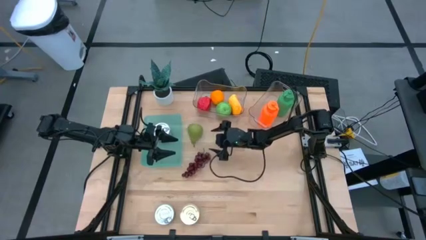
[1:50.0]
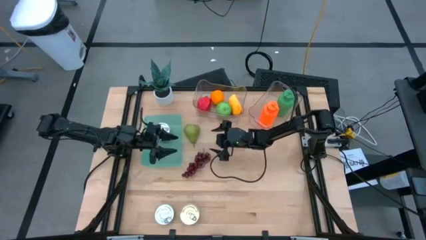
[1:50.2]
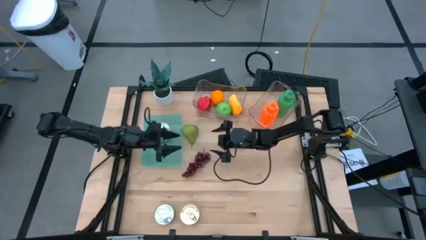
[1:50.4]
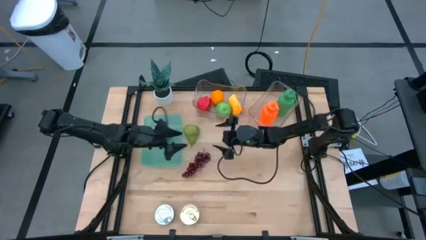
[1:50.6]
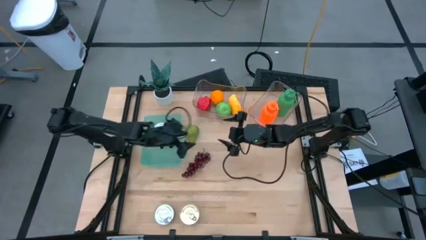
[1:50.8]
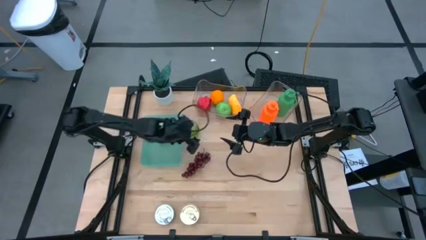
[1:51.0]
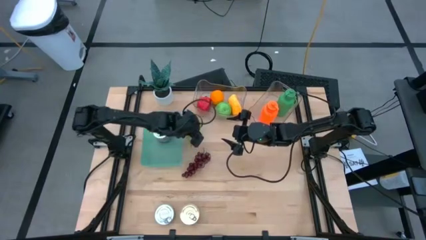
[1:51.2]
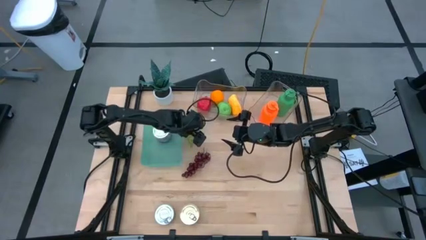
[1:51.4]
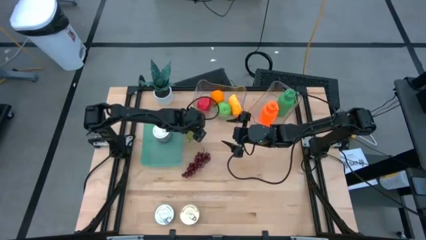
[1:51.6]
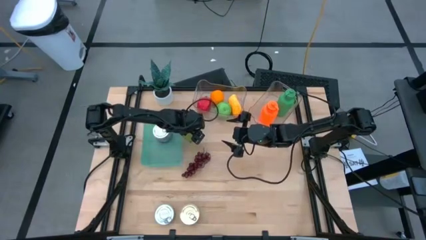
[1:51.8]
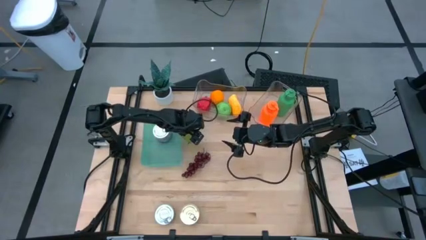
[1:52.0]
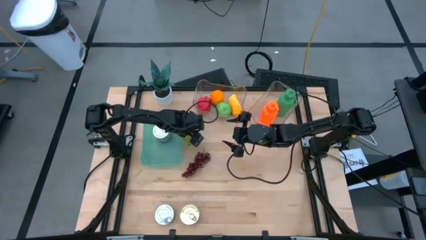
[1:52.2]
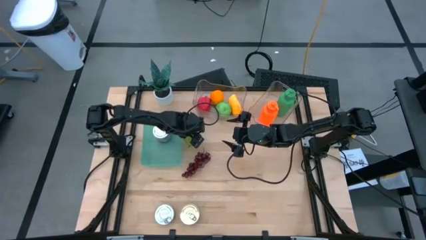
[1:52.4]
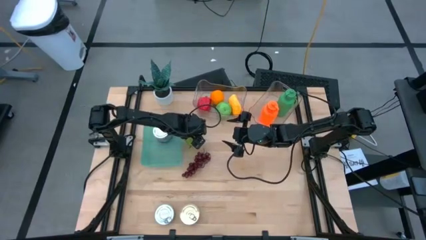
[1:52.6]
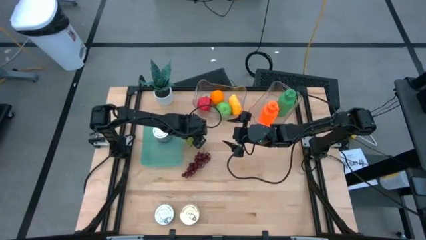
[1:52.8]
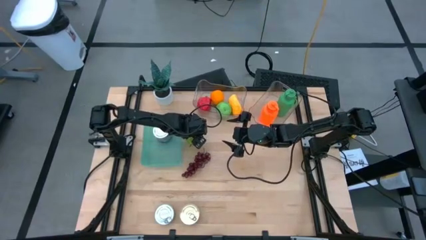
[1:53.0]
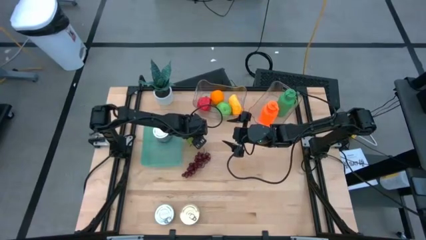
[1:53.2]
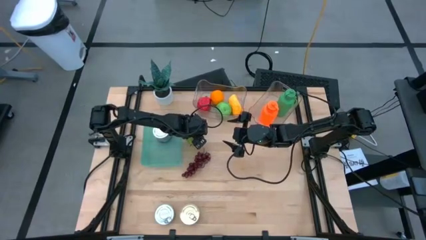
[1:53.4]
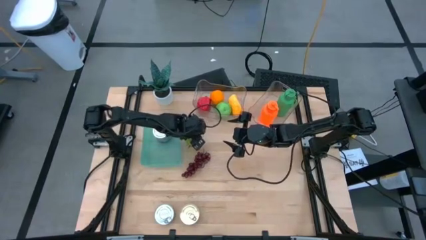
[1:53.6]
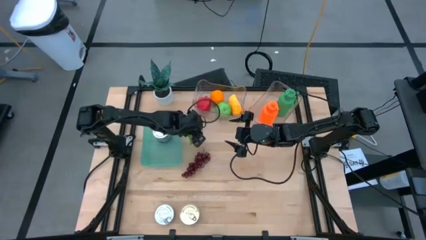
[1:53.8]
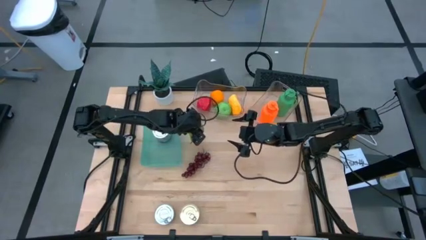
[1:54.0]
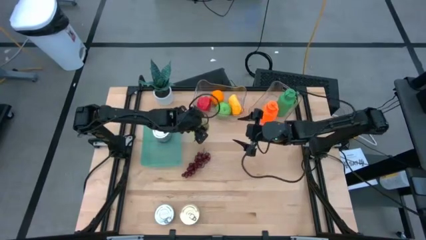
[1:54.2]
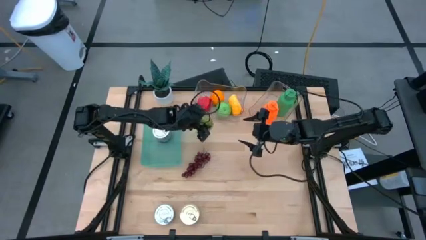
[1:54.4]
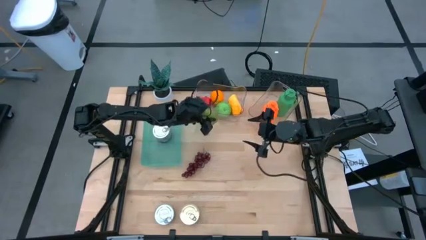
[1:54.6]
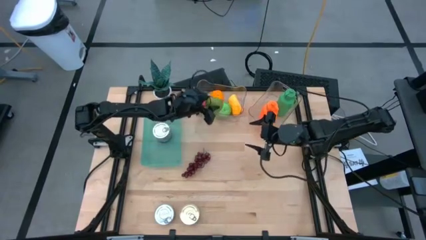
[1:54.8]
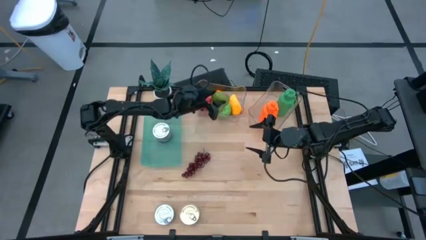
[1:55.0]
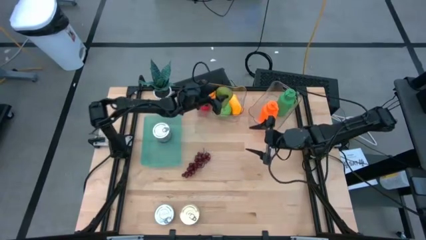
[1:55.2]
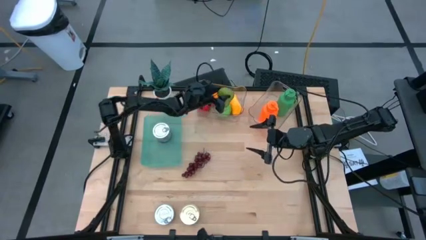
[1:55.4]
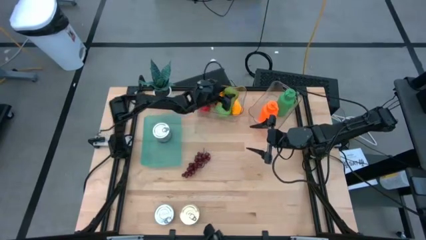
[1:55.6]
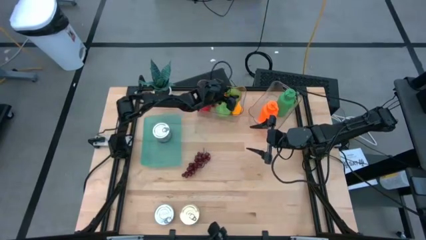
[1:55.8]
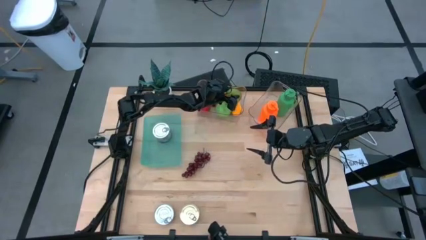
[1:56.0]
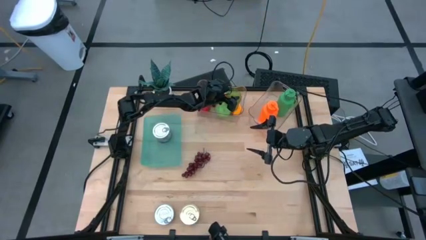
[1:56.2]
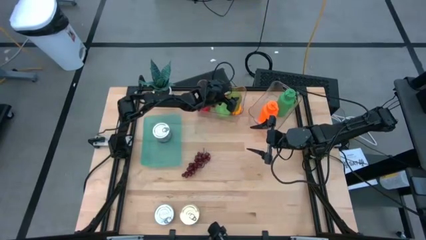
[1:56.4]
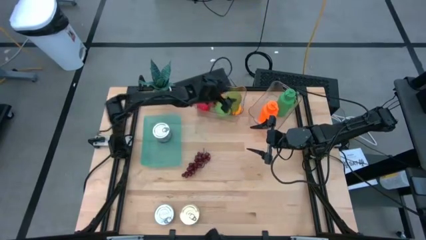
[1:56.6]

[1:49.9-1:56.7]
Task: Pick & Place Food Item
Put the green pear into the left transparent bin

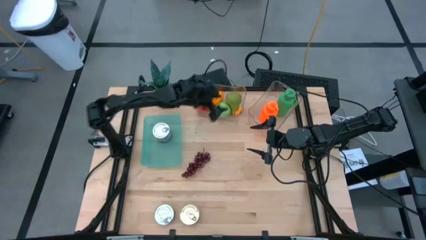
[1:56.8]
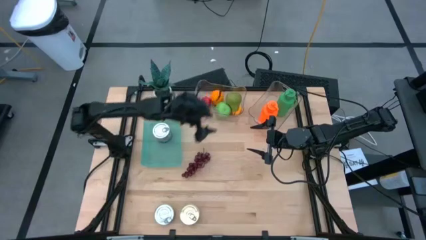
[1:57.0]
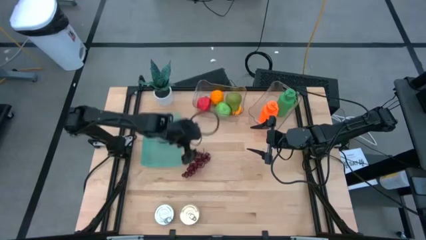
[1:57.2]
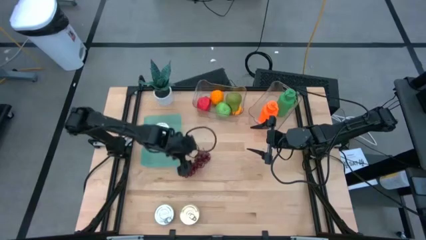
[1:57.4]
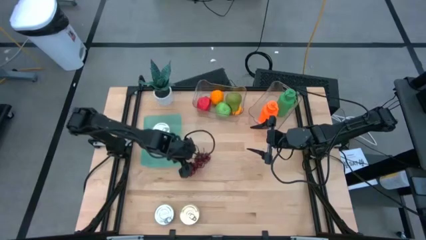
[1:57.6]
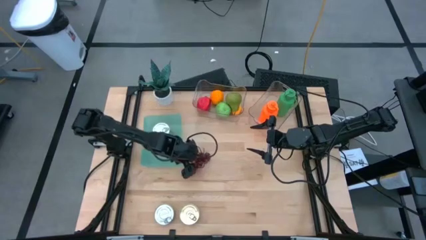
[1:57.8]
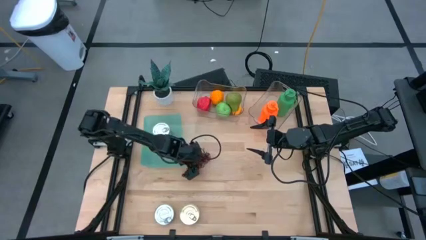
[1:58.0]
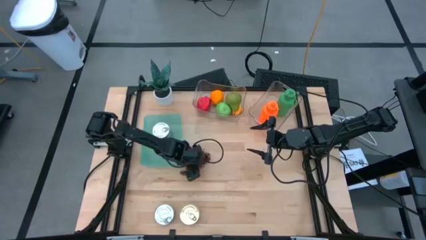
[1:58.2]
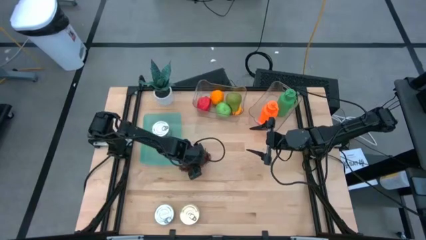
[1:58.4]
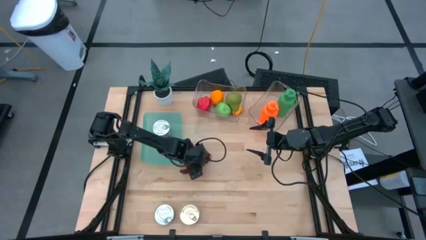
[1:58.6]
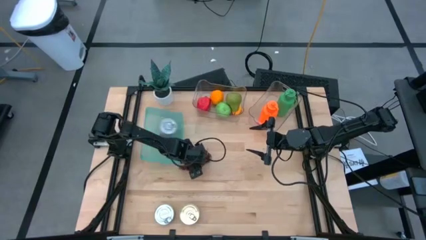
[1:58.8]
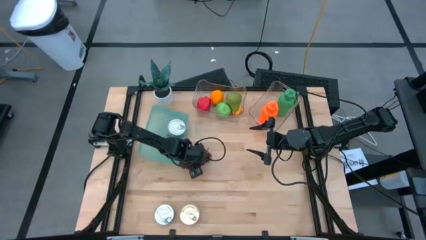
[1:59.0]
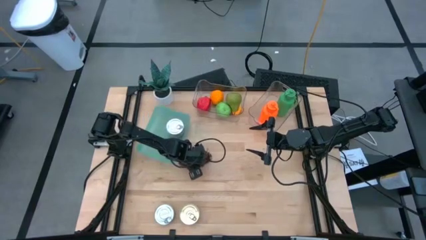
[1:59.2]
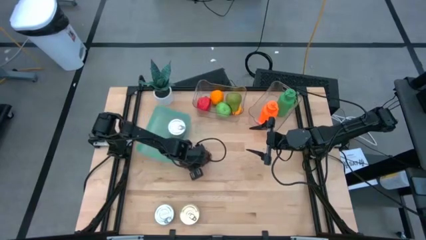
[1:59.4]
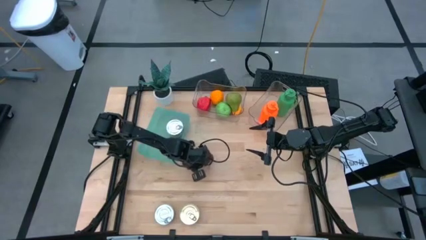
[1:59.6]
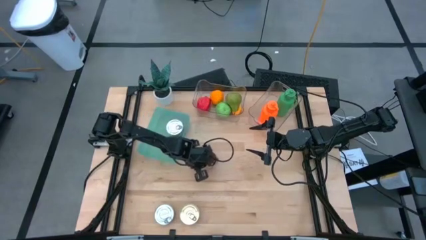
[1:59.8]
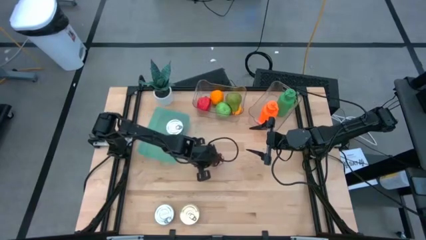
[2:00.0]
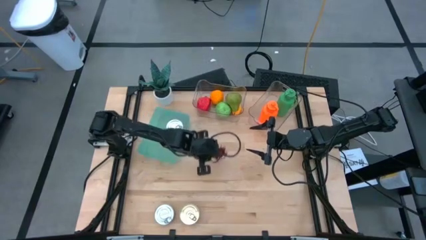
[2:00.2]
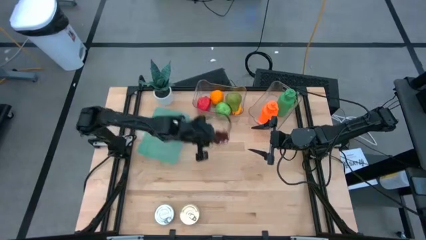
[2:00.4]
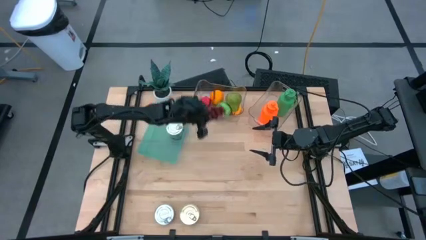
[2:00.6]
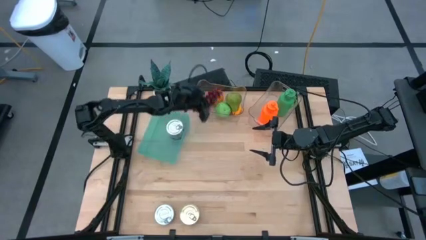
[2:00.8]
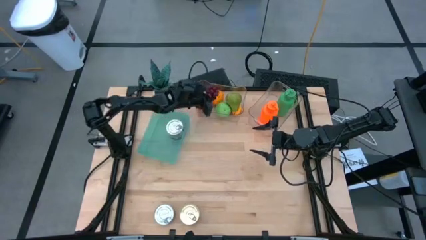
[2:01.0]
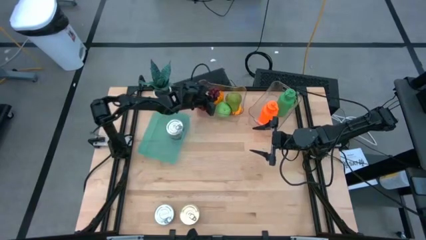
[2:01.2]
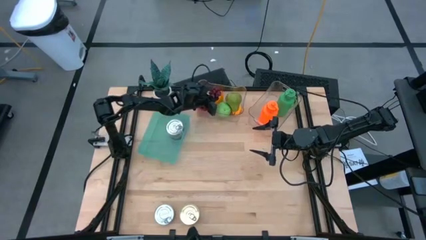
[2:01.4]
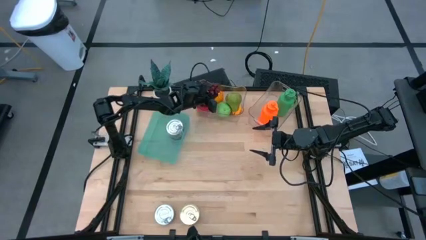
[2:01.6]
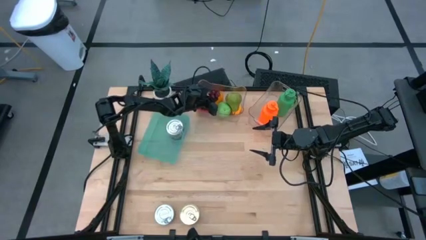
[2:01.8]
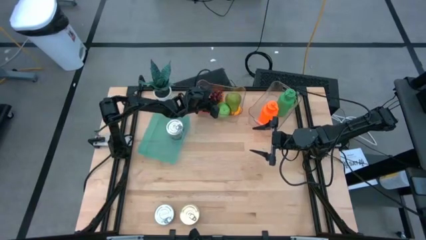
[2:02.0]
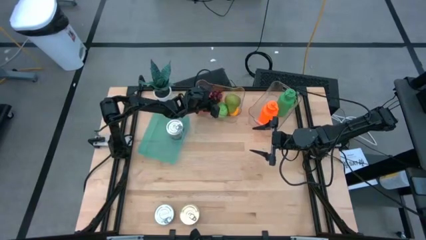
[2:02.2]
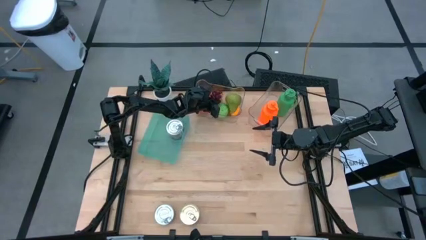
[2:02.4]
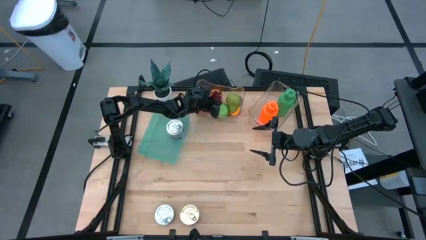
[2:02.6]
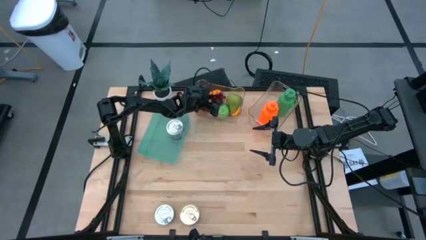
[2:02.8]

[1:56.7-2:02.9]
Put the purple grapes into the left transparent bin

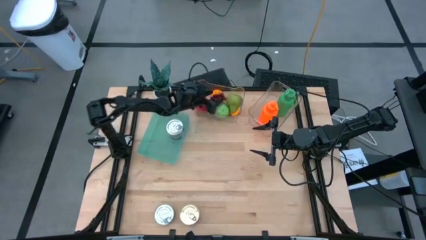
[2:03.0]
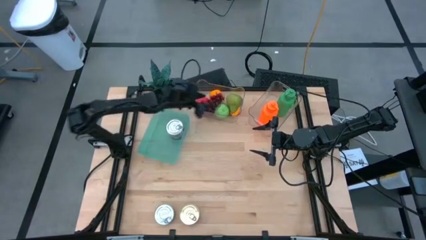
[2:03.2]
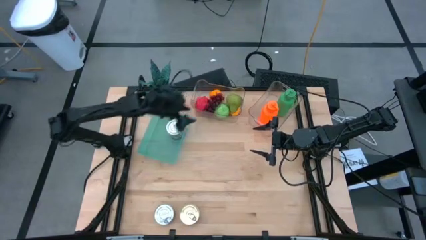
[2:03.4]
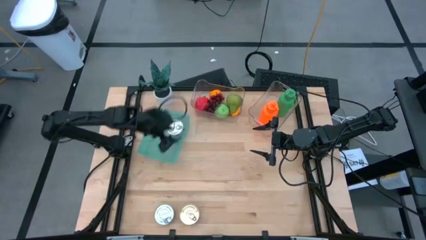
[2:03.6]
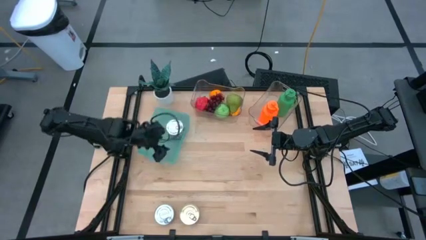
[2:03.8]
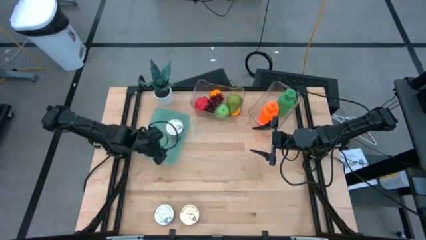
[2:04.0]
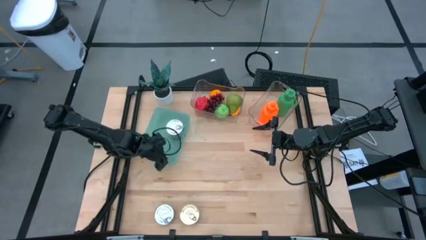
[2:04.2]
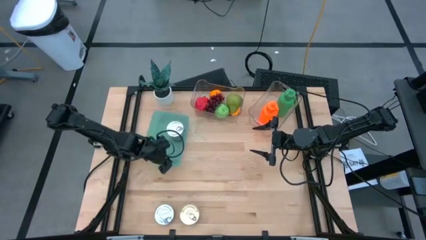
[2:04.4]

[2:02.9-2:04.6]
Adjust the green bin on the table

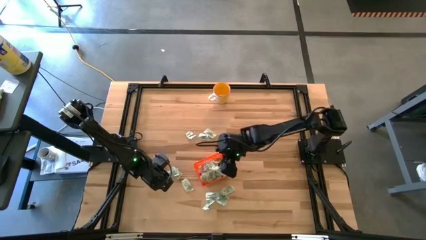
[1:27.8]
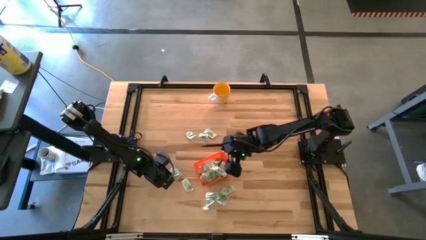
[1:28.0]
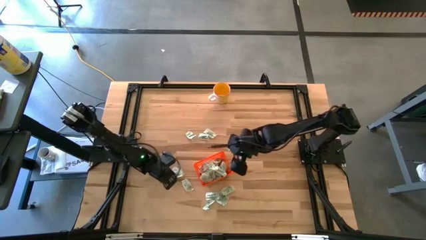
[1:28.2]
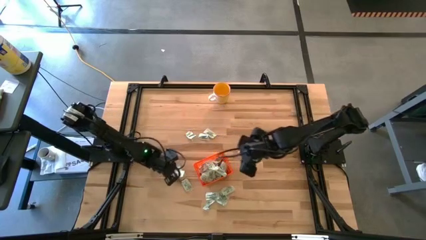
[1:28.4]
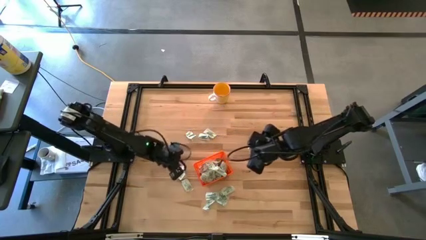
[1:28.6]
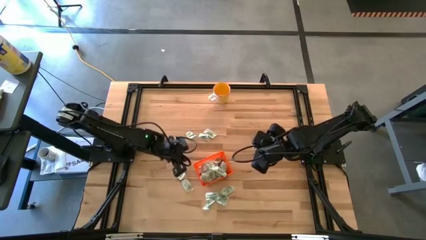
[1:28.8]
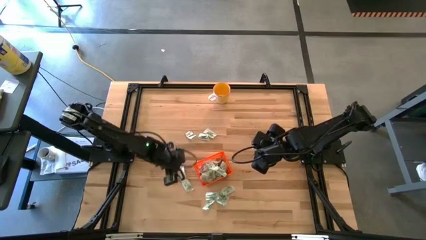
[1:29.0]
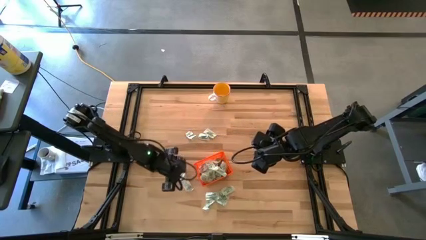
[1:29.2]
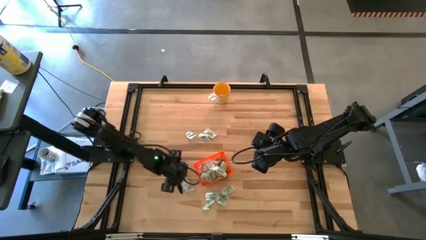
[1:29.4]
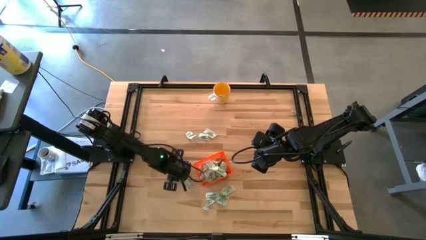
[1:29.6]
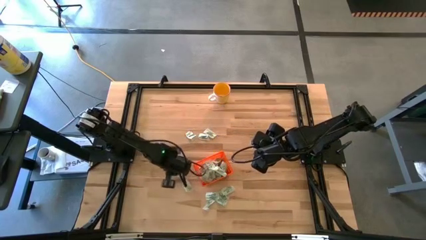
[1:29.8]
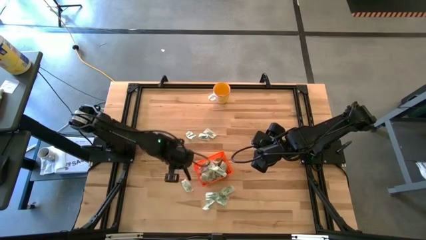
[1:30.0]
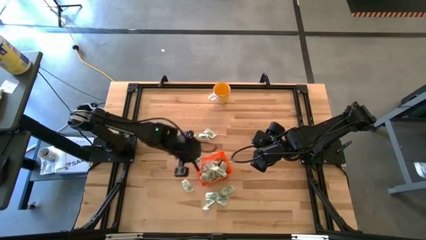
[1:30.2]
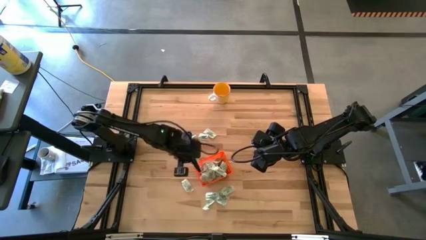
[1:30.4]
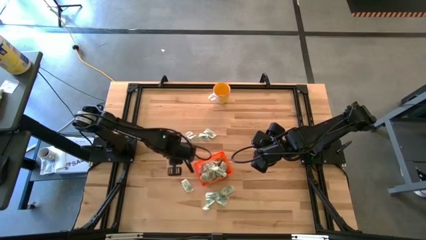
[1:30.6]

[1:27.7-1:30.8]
Task: Pick and place Stevia / Truvia into bins
Put the stevia packet into the bin

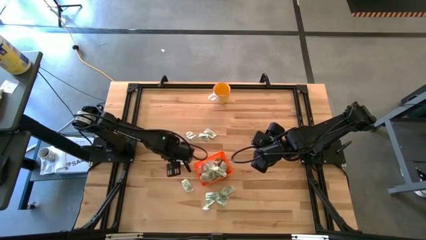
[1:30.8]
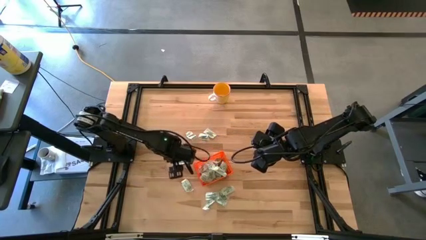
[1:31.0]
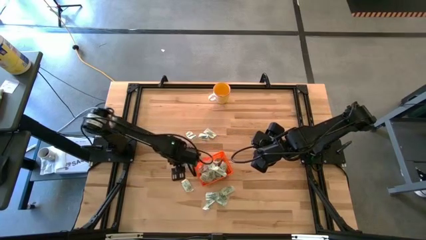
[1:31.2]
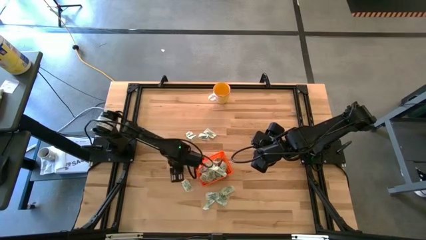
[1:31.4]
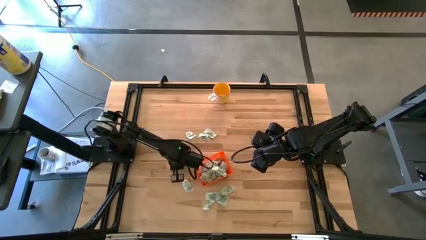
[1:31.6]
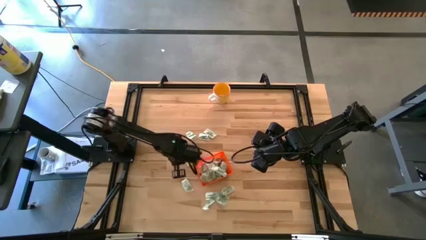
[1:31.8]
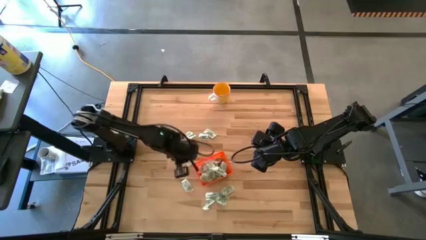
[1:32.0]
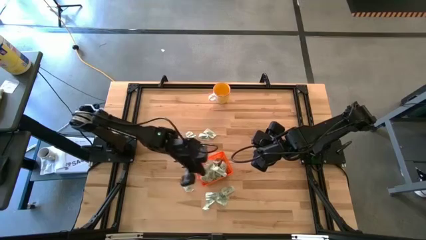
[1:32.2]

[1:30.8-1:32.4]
Put the stevia packet into the bin
